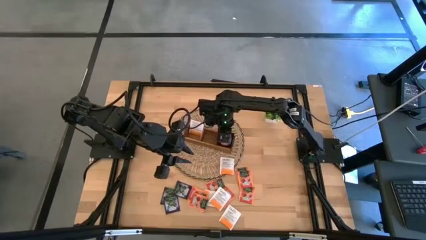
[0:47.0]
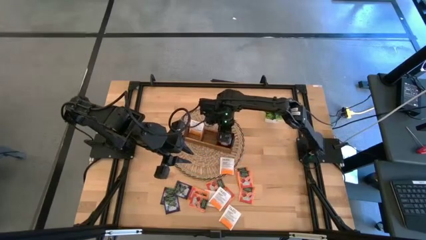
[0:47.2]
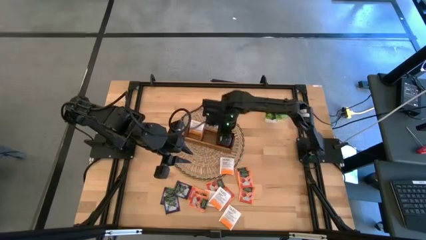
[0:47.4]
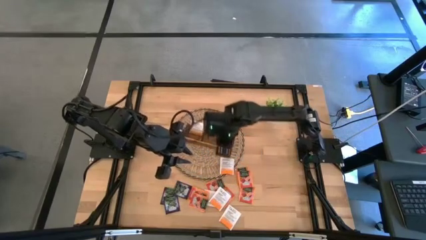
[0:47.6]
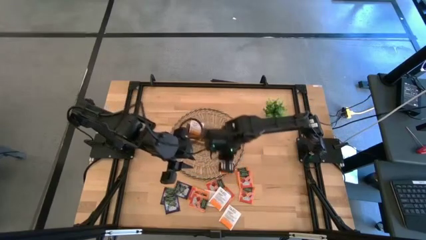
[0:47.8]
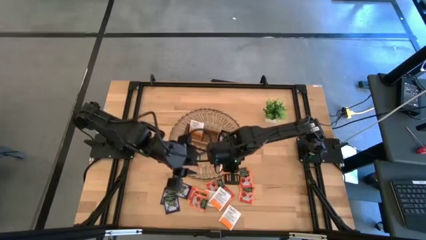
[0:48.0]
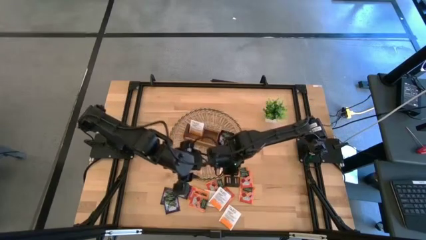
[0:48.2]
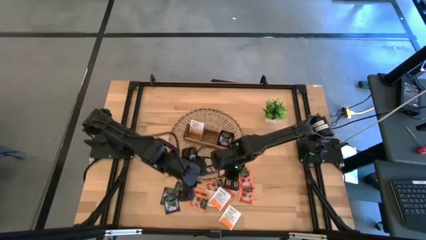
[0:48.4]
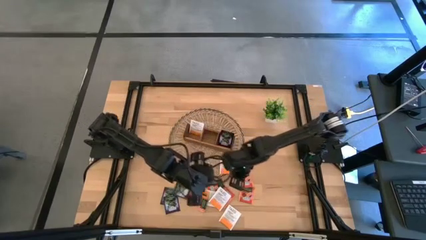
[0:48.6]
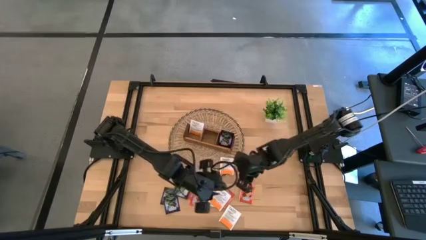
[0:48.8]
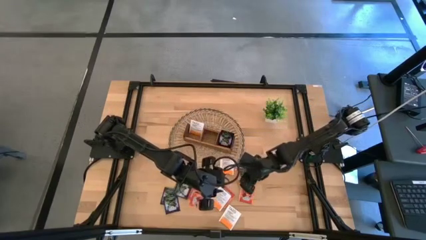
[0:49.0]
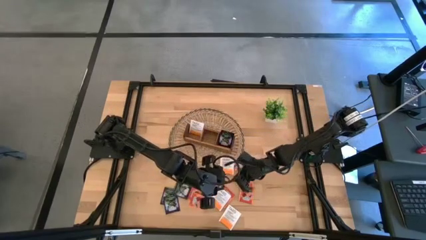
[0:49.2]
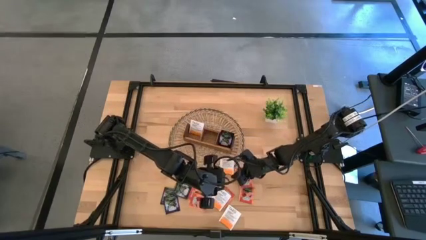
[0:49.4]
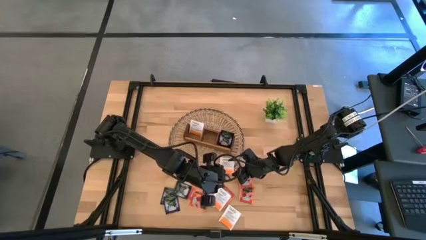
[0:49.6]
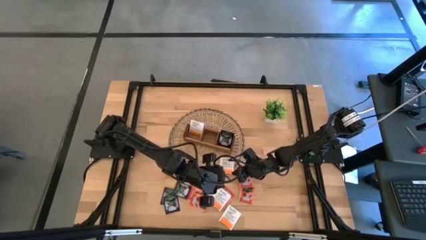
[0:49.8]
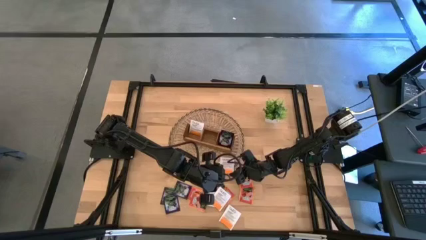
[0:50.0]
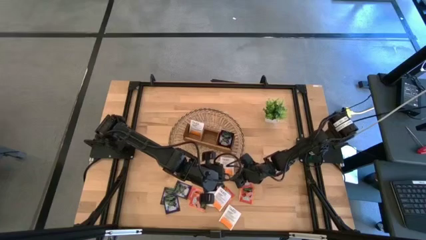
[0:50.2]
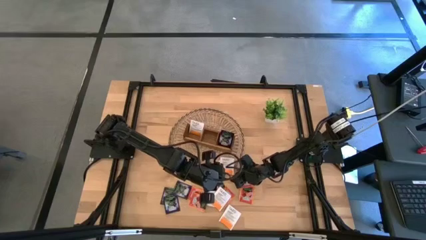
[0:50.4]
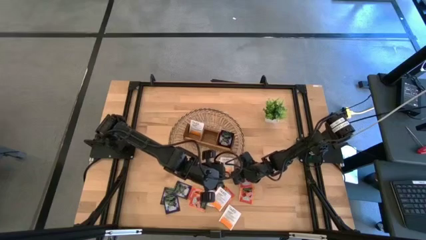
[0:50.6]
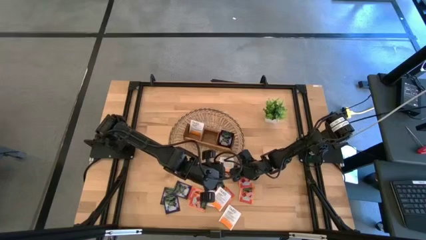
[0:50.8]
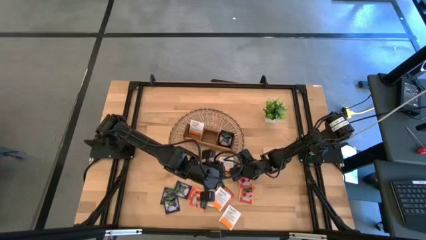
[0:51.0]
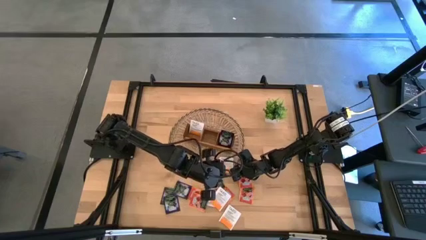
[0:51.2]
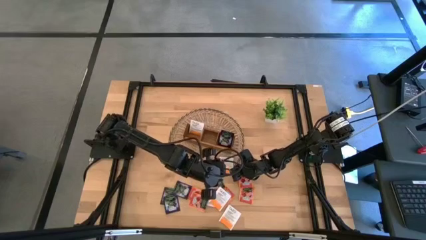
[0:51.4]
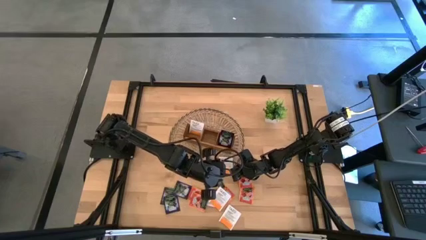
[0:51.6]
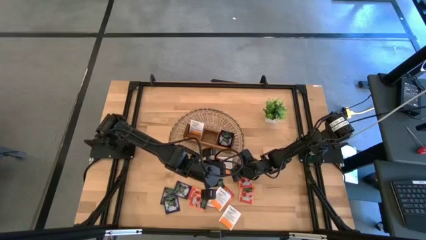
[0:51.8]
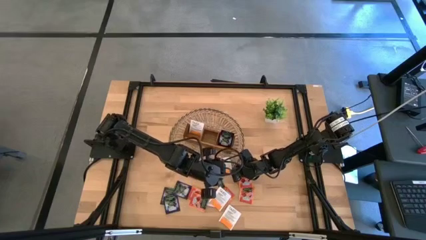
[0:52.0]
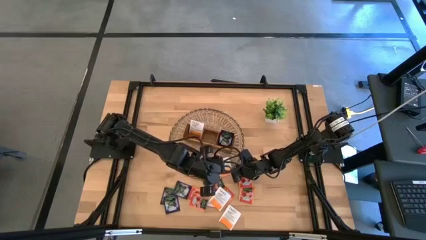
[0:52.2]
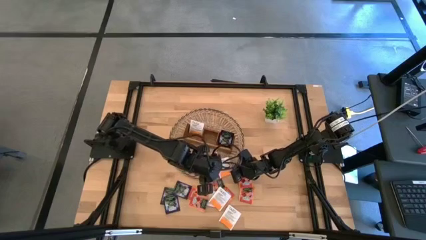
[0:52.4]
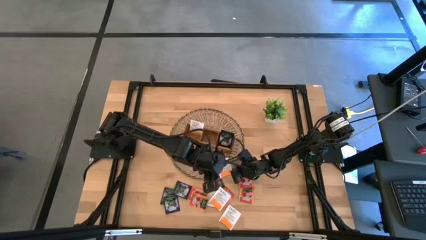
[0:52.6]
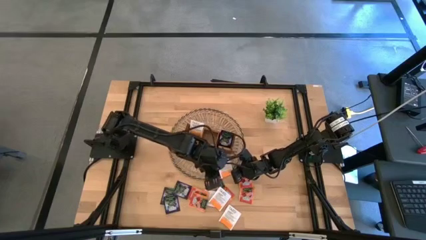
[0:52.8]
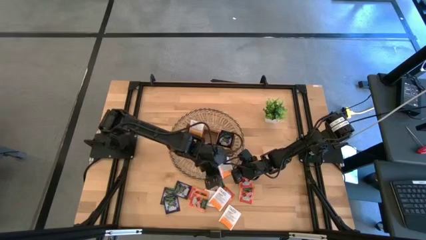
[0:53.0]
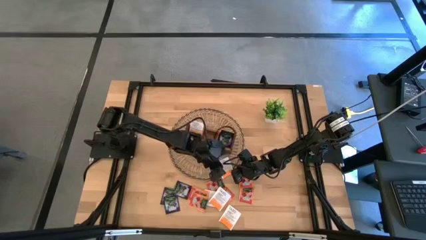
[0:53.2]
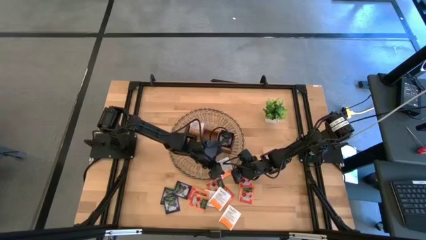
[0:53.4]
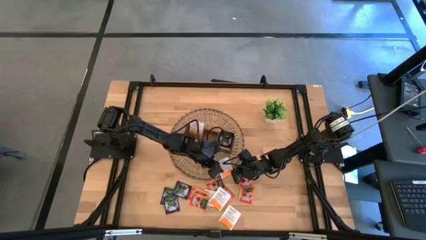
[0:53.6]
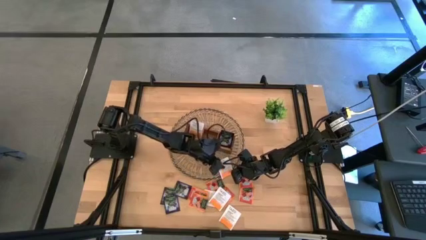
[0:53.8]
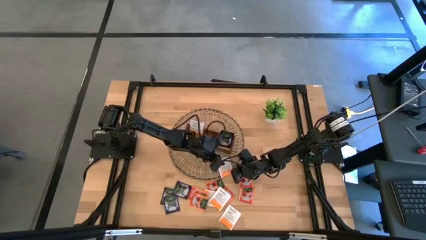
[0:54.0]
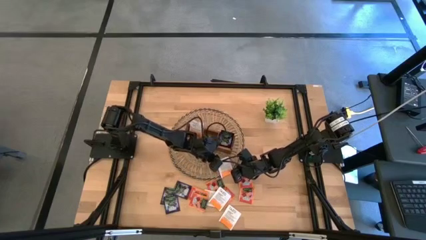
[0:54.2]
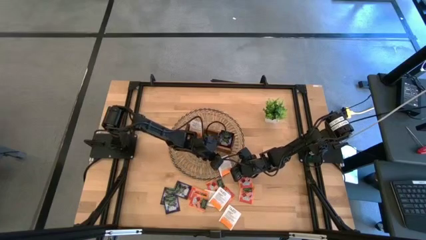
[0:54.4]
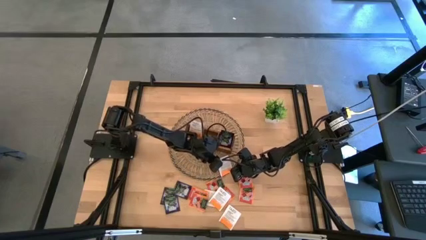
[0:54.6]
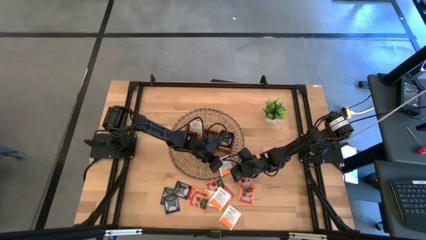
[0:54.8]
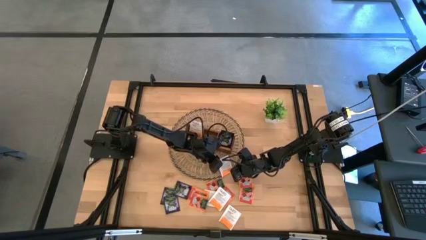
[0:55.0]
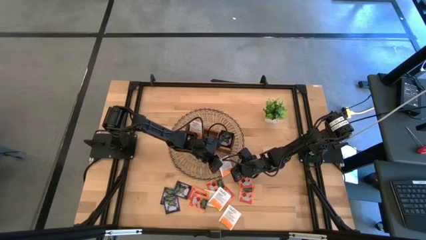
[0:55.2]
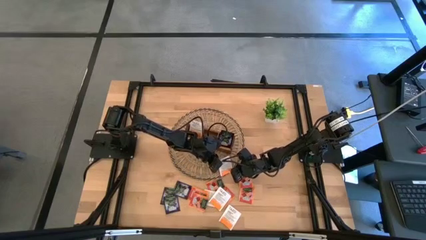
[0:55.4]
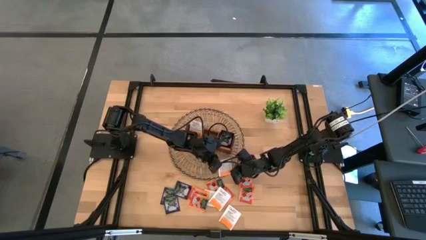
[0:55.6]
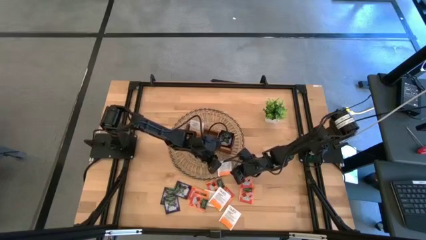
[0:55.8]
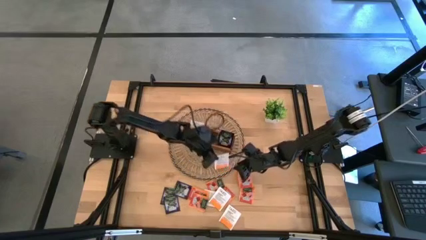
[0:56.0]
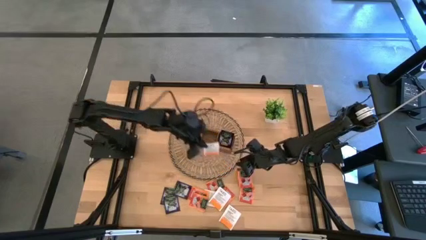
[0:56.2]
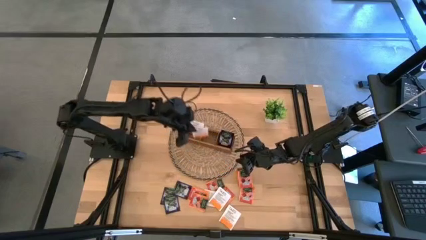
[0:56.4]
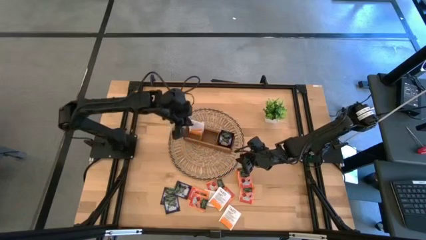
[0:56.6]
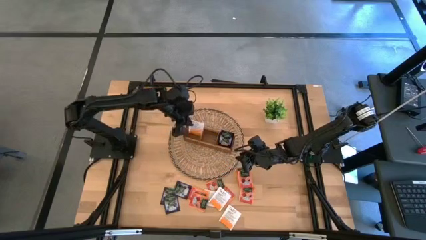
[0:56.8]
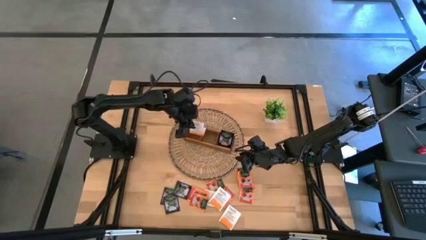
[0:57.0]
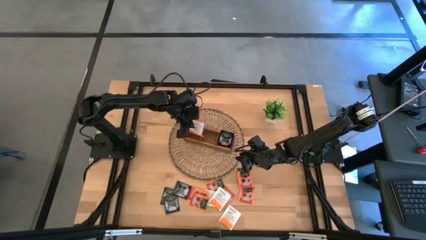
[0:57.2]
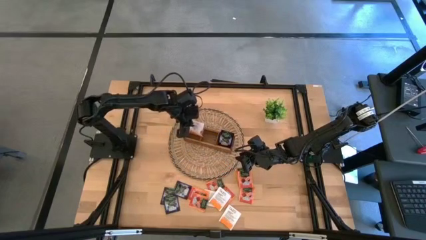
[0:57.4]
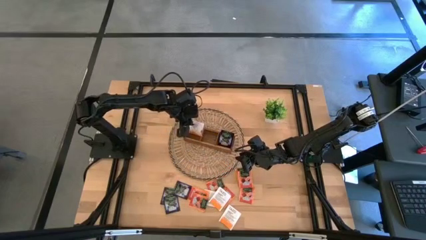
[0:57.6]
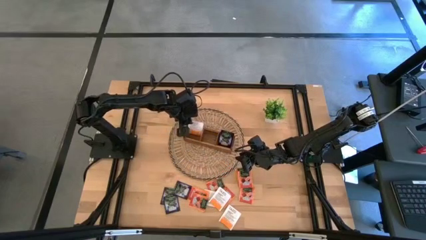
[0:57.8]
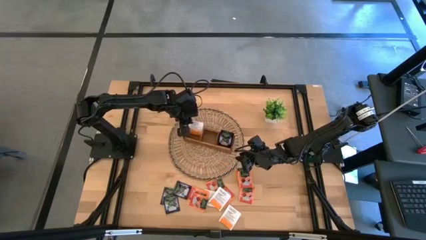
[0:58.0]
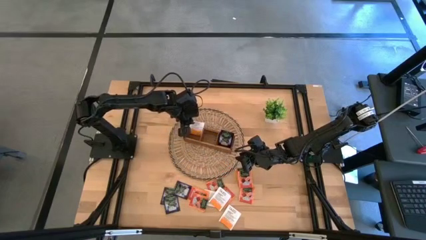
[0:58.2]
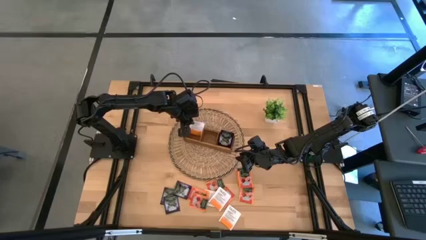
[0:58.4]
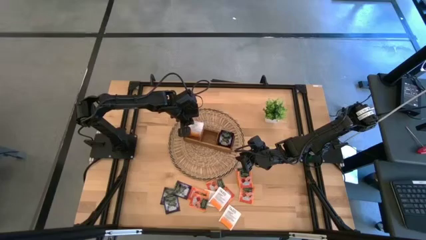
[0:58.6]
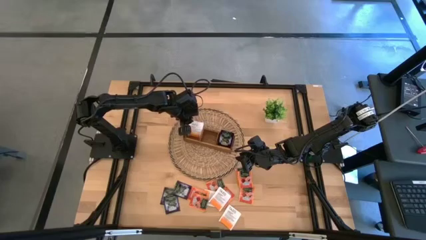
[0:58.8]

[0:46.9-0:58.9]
Task: Pick & Place Tea
Put the white tea bag into the left section of the wooden organizer
